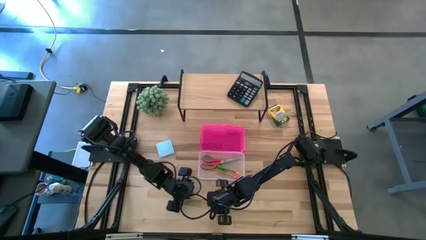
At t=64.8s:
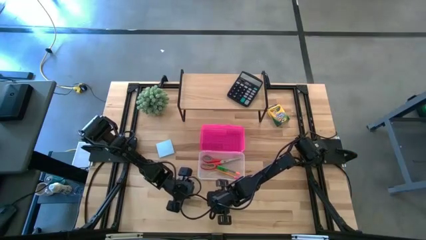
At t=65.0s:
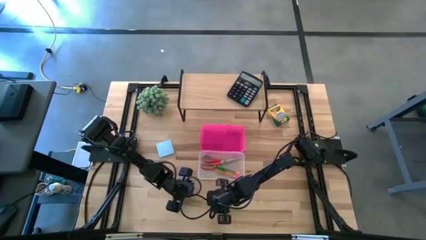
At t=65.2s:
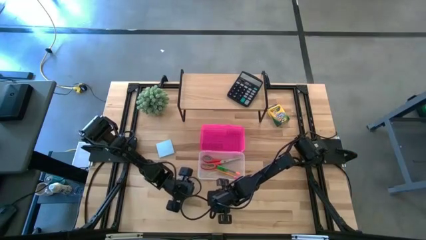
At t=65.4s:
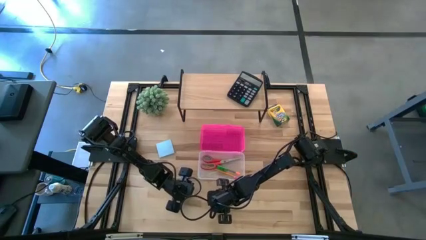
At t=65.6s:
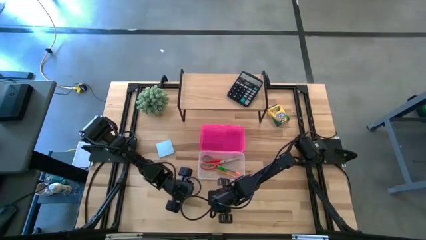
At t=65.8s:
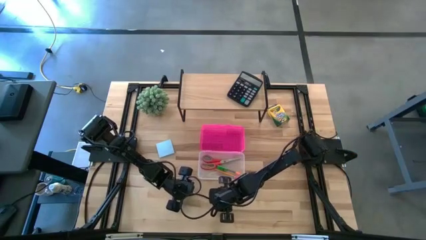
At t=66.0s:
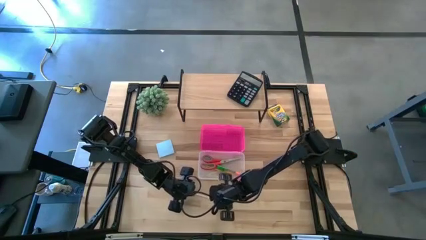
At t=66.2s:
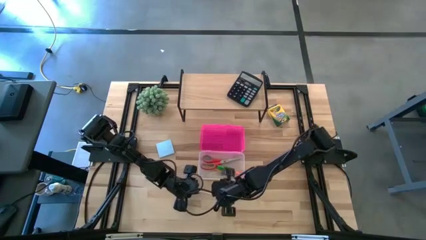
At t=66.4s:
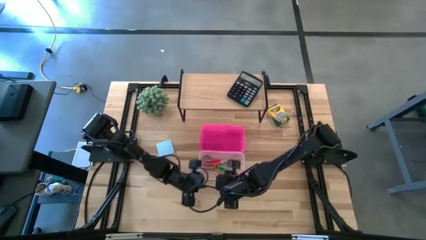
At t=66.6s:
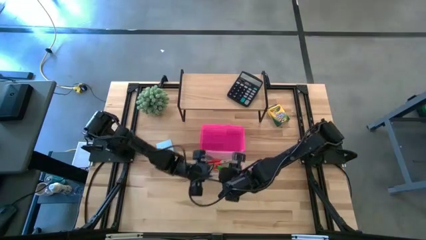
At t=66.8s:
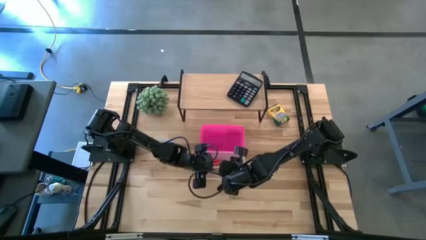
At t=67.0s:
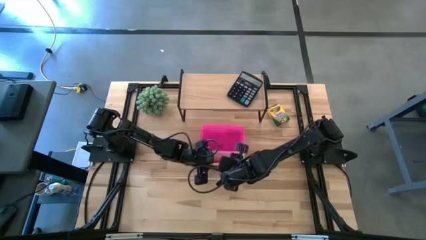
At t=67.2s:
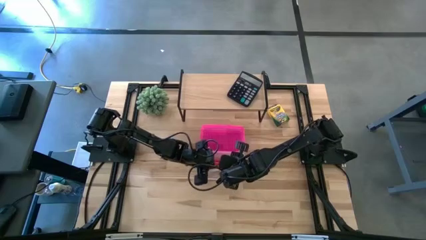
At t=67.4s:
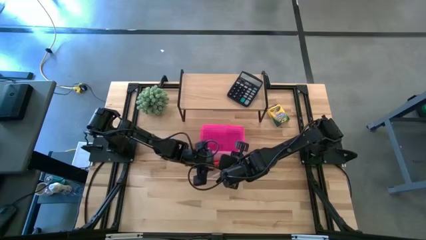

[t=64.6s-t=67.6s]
Task: Pack school essentials
Put the white pen into the transparent bin

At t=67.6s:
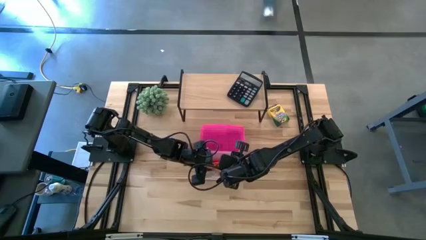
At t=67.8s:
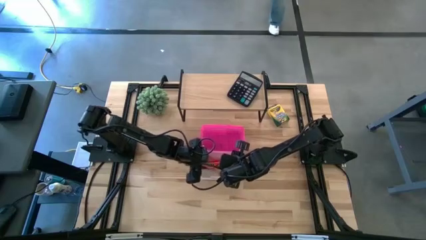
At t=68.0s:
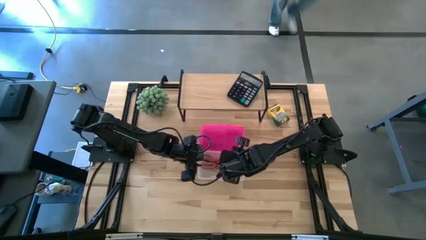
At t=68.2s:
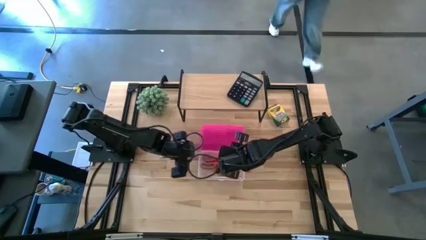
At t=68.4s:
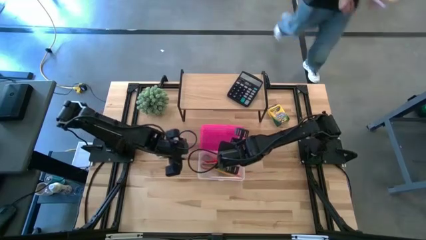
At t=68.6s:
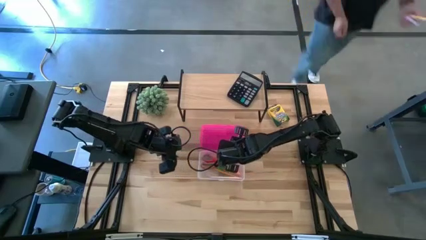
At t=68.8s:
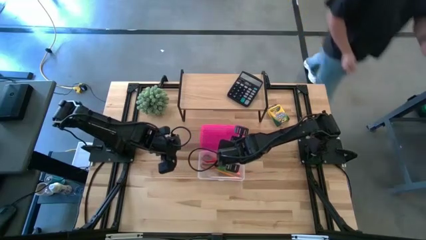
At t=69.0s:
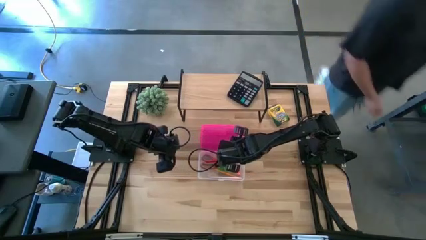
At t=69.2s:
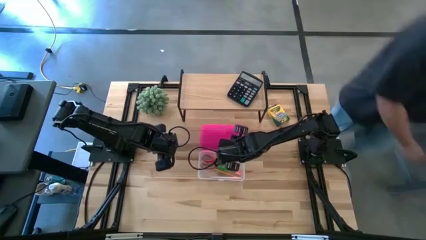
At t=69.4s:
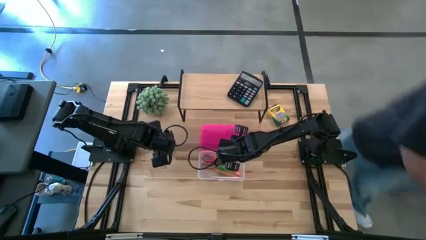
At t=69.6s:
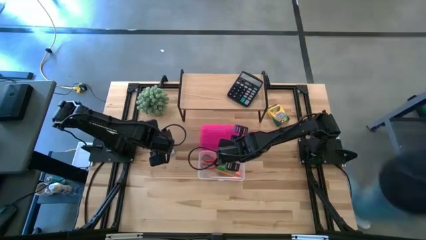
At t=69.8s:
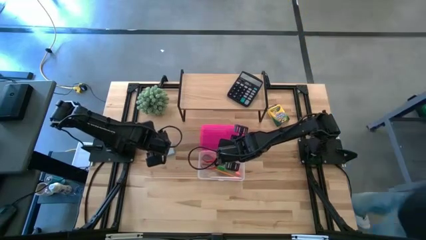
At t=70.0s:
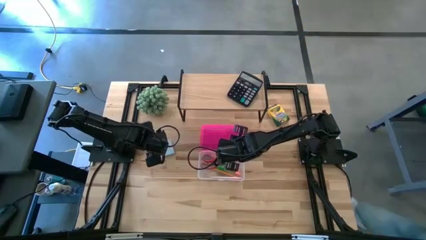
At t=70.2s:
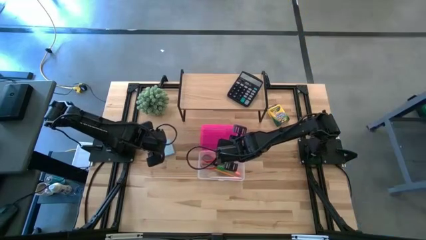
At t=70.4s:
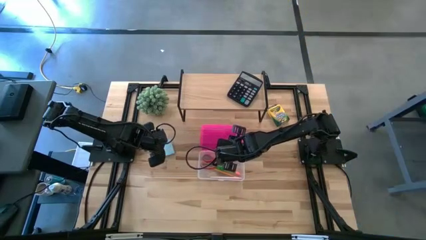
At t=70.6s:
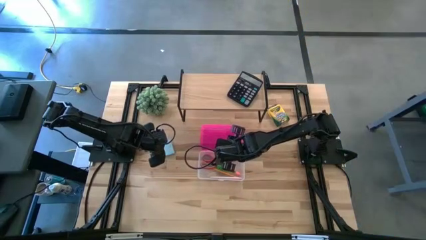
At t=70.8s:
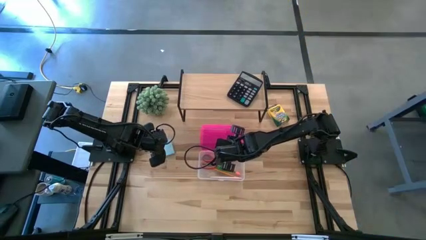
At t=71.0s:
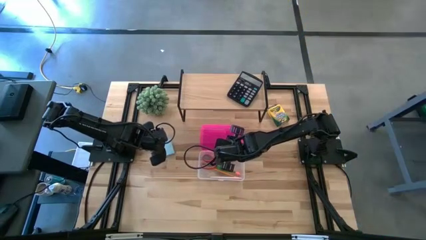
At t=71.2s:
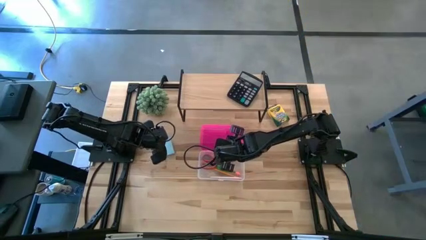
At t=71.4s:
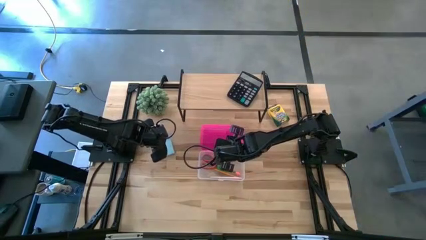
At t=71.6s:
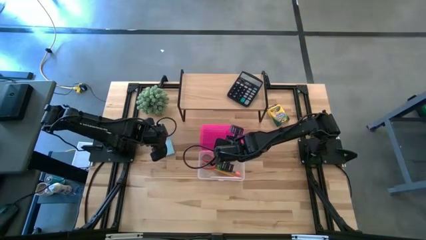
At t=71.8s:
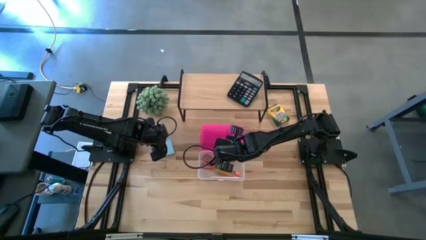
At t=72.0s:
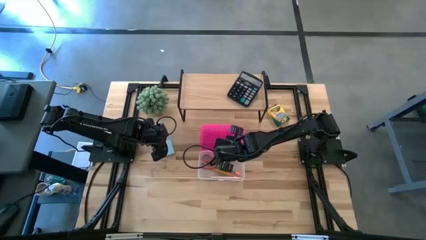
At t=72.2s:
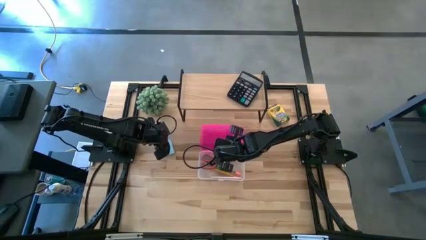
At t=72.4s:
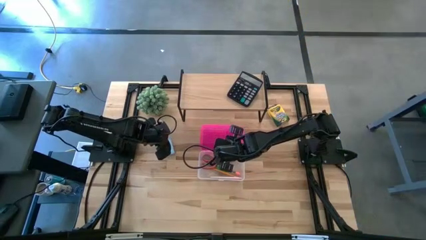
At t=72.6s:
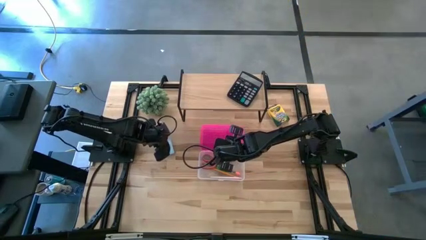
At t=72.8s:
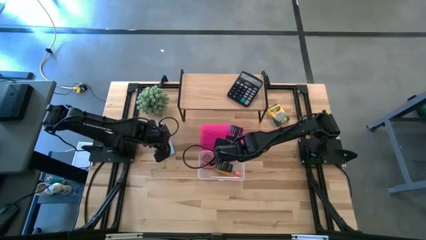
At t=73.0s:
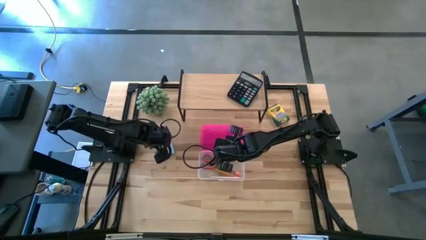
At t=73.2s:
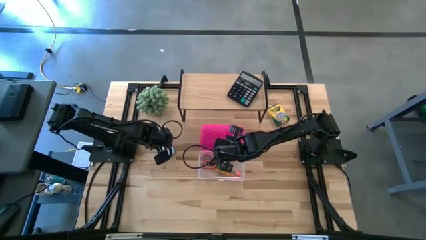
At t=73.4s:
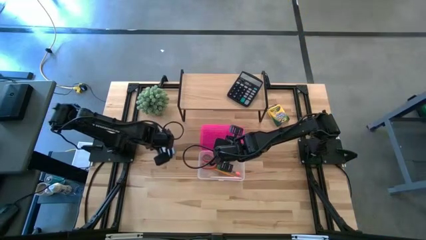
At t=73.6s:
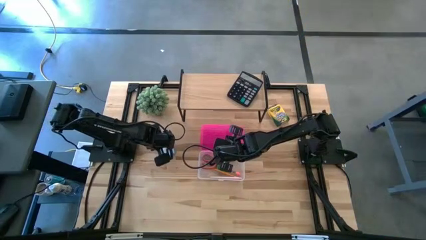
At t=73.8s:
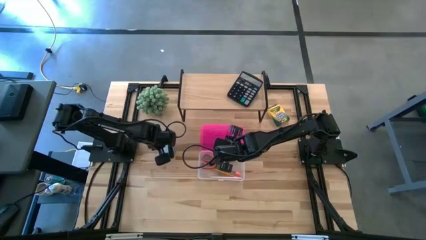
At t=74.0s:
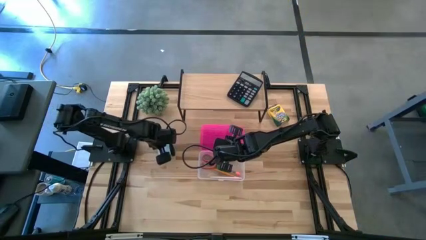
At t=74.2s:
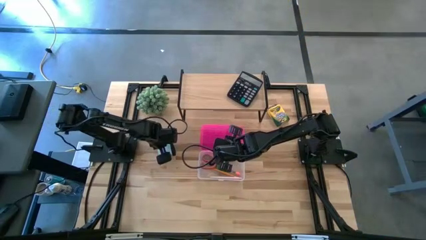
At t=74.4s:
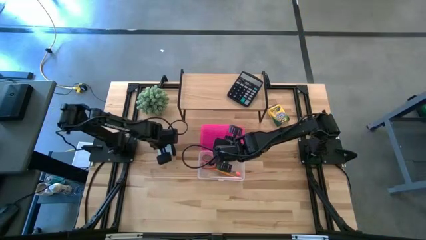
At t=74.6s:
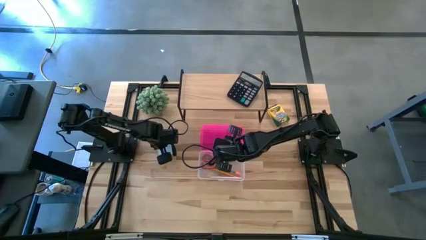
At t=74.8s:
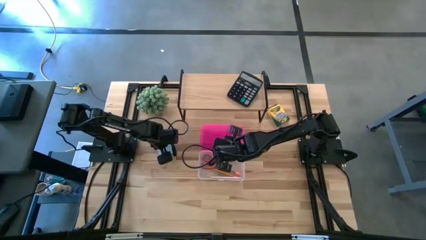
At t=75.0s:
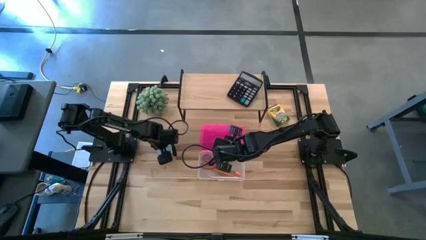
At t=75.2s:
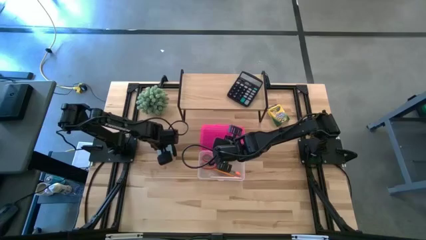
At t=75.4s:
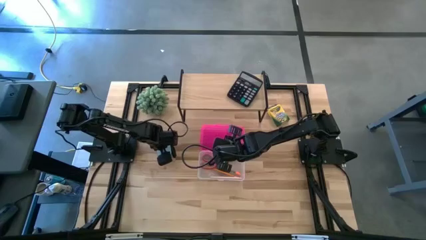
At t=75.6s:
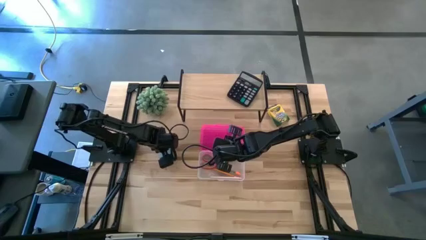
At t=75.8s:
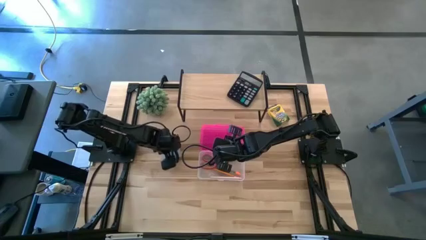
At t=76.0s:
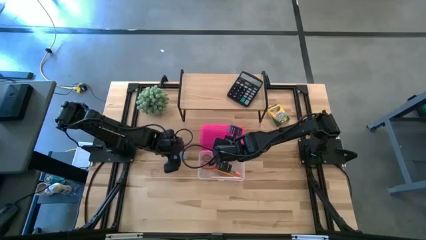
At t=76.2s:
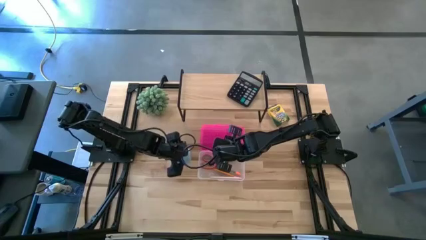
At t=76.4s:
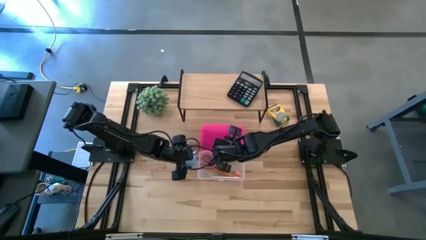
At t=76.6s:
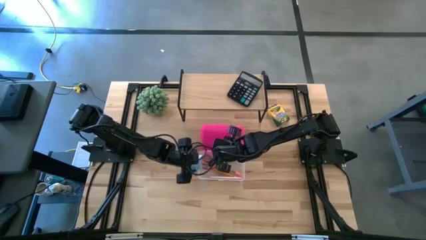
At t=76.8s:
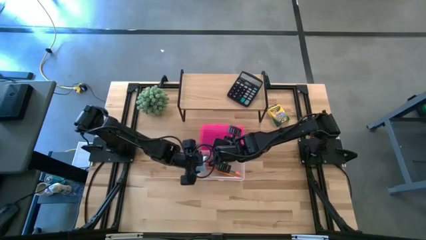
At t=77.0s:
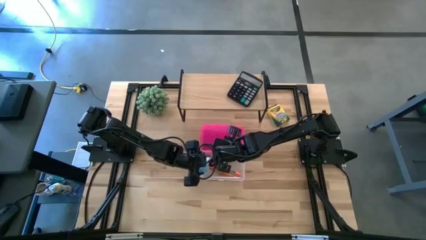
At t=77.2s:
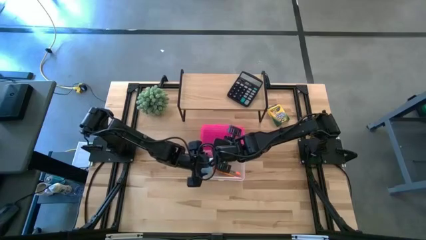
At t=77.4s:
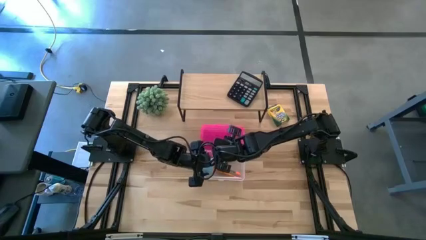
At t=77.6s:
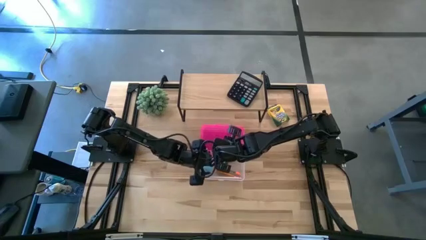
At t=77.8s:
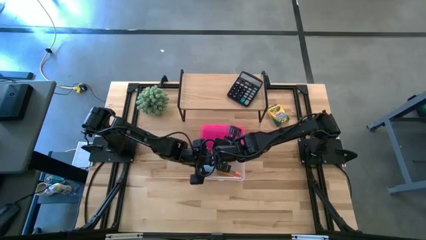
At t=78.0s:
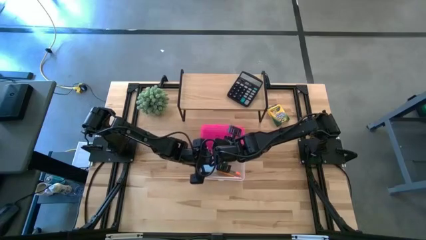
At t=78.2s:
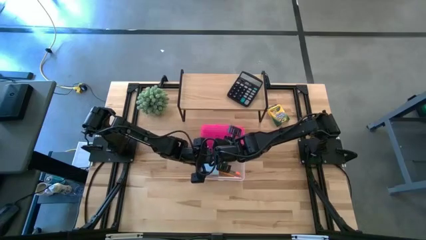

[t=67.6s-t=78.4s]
Put the blue sticky note into the transparent bin

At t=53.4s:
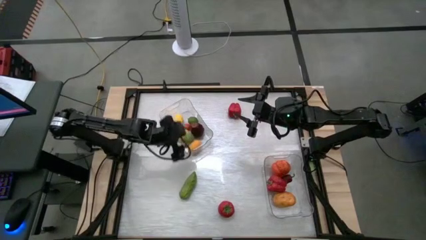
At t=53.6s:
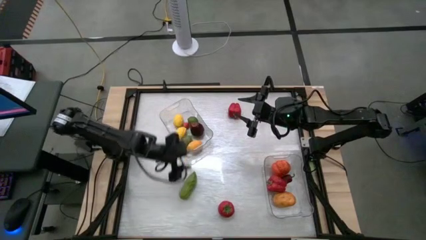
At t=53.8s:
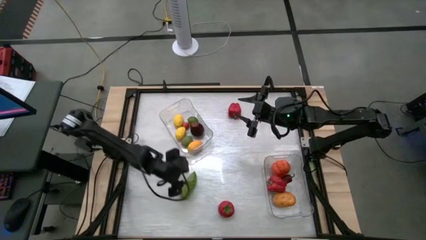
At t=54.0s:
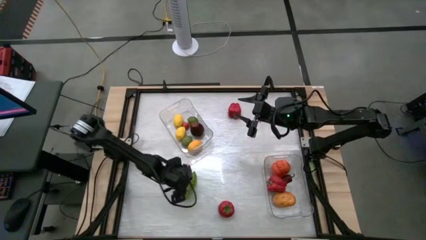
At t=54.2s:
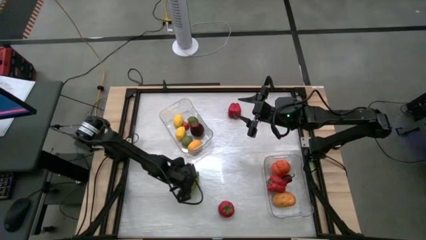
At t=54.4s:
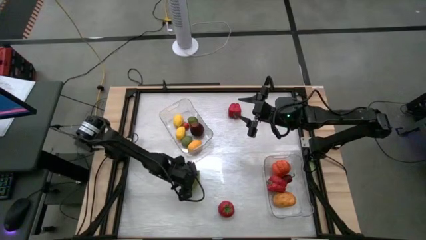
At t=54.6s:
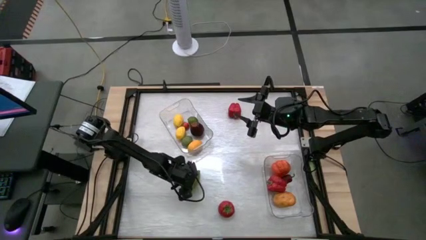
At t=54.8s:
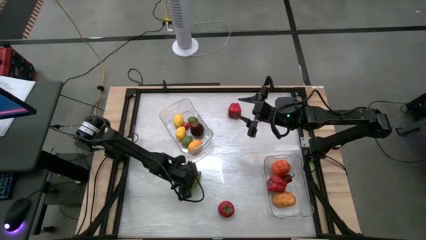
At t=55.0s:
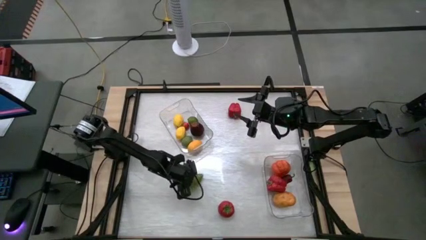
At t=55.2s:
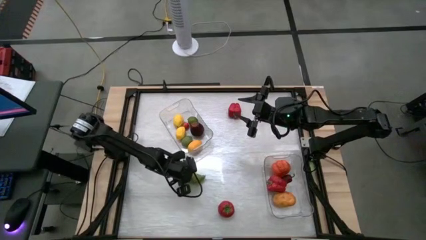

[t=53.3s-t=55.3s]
Task: Sort produce into baskets
Put the green cucumber into the bottom transparent bin
